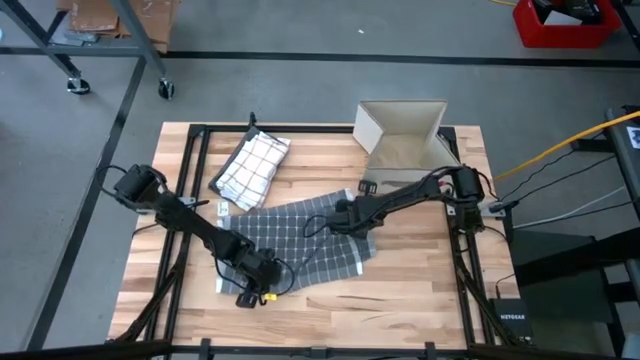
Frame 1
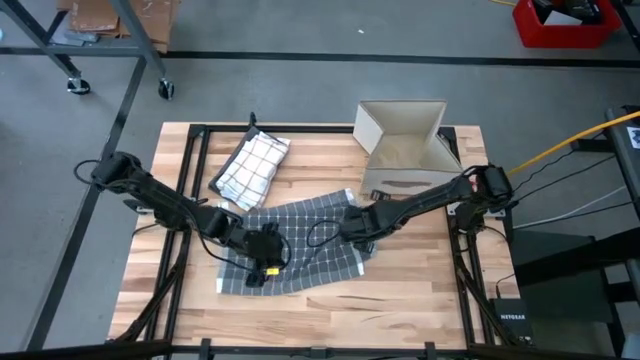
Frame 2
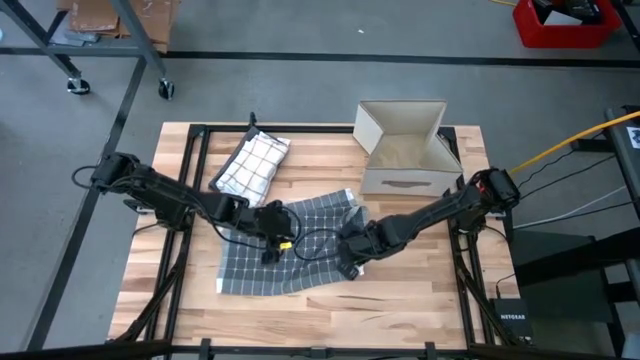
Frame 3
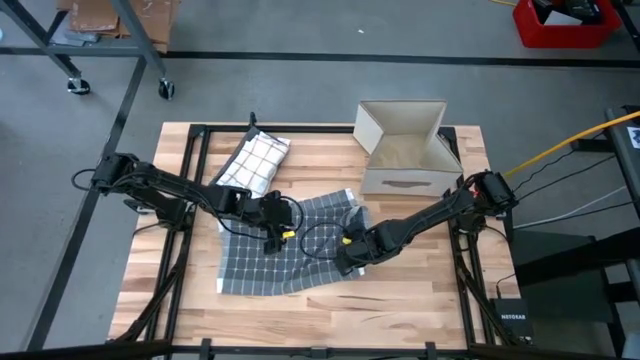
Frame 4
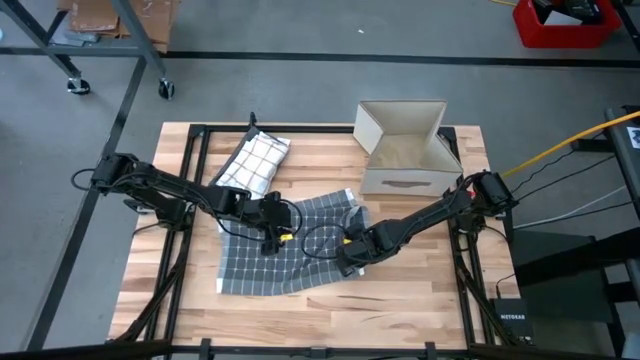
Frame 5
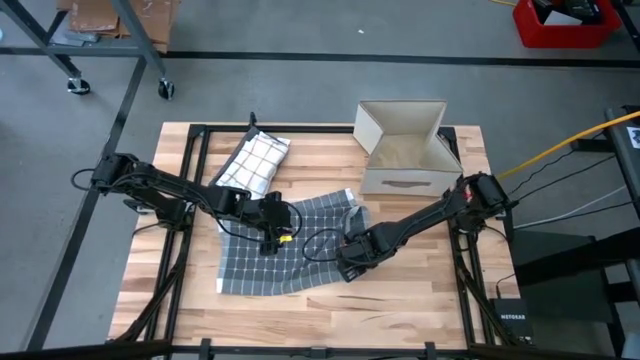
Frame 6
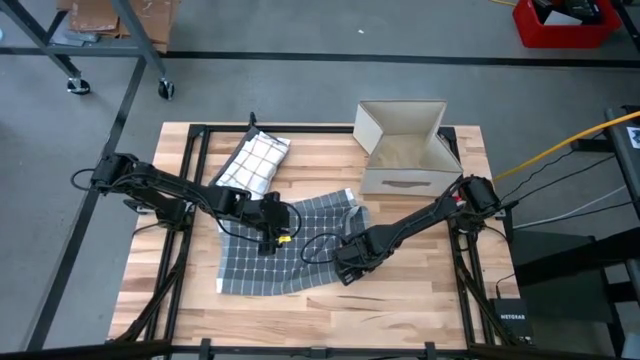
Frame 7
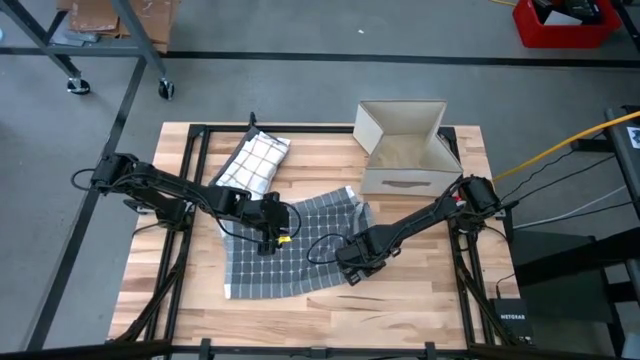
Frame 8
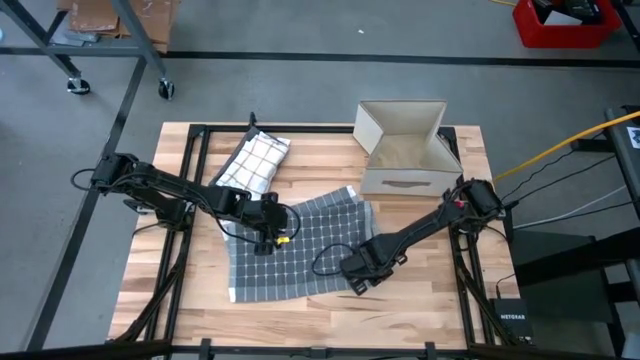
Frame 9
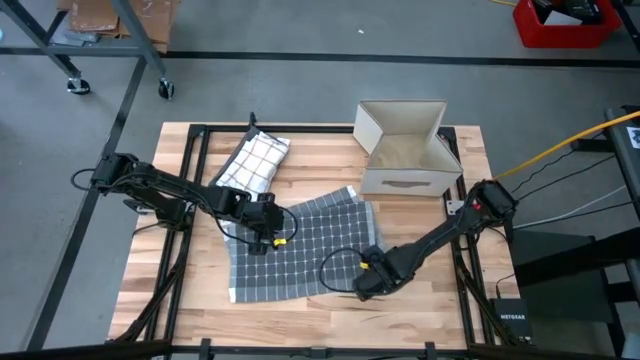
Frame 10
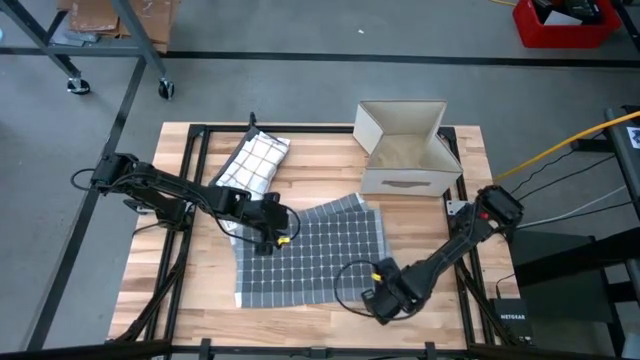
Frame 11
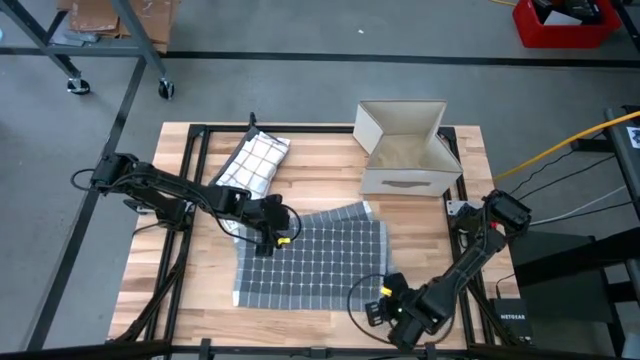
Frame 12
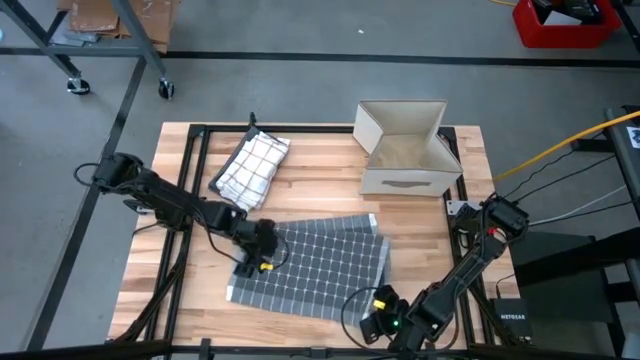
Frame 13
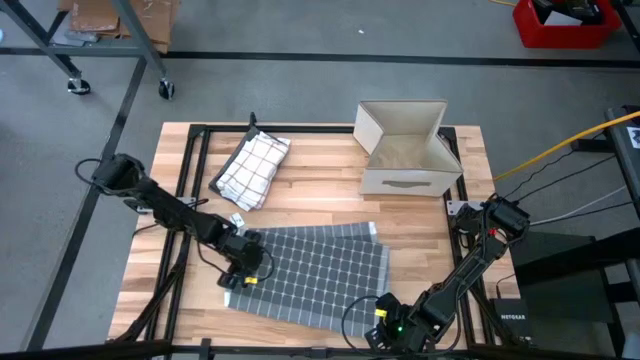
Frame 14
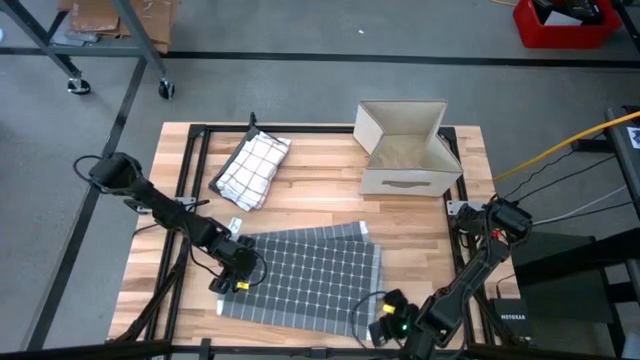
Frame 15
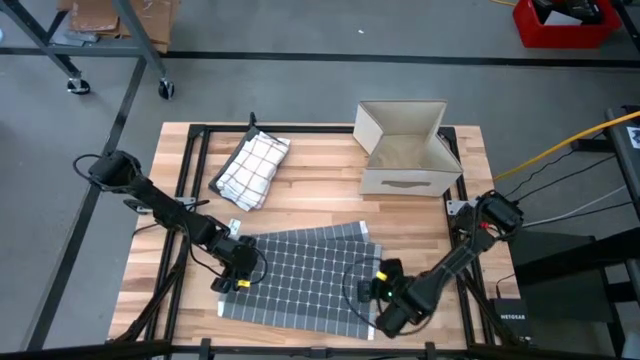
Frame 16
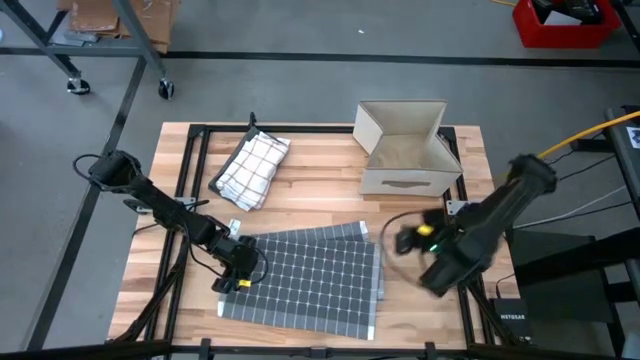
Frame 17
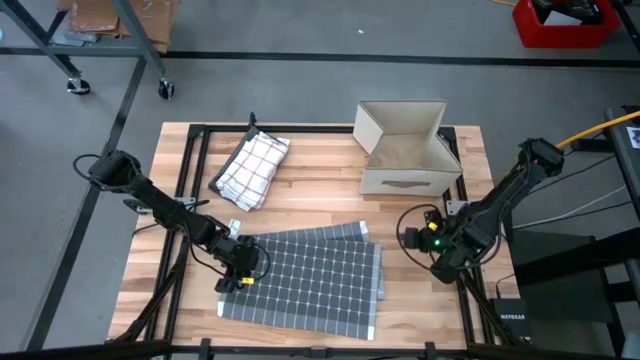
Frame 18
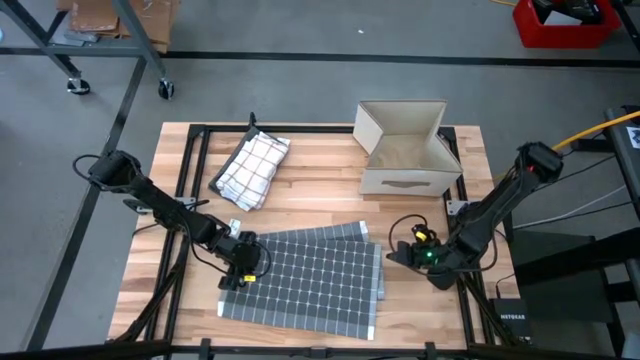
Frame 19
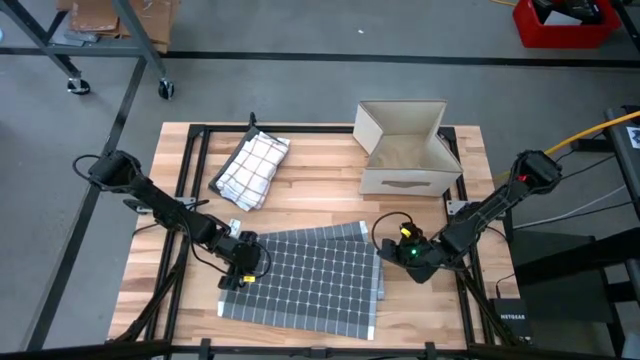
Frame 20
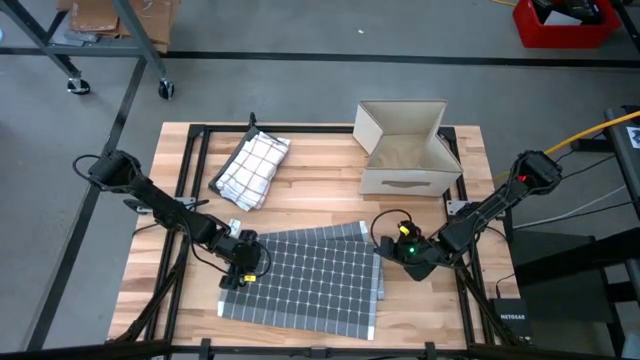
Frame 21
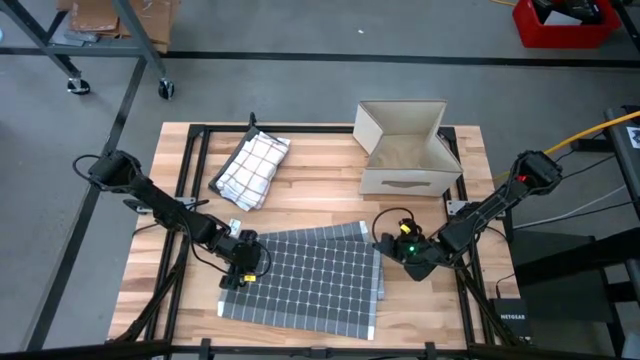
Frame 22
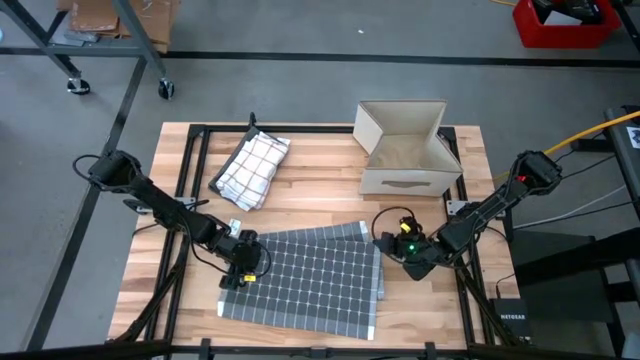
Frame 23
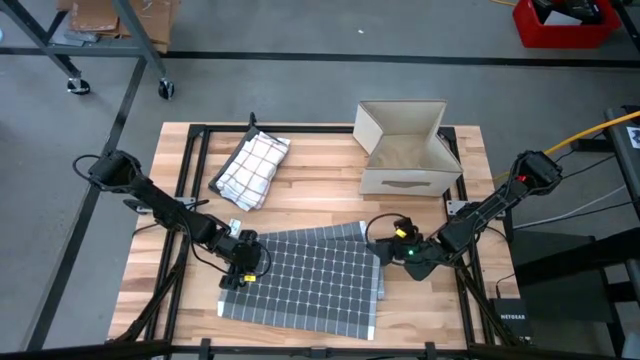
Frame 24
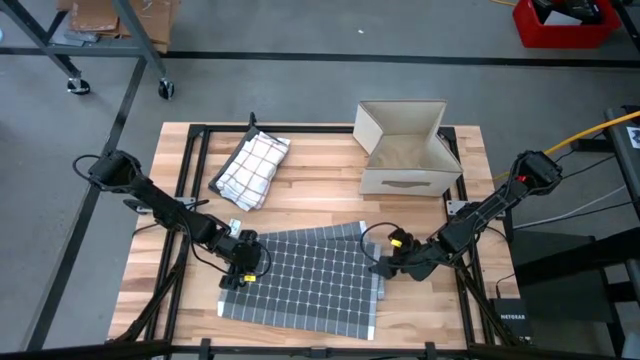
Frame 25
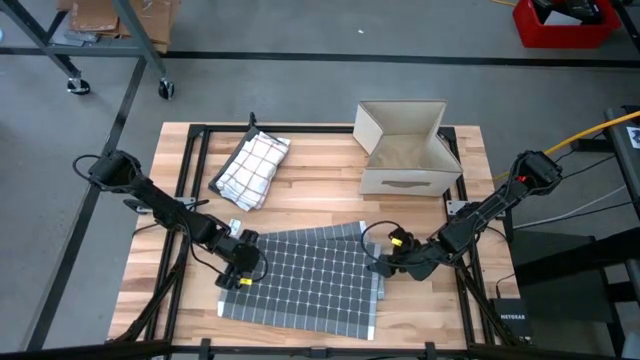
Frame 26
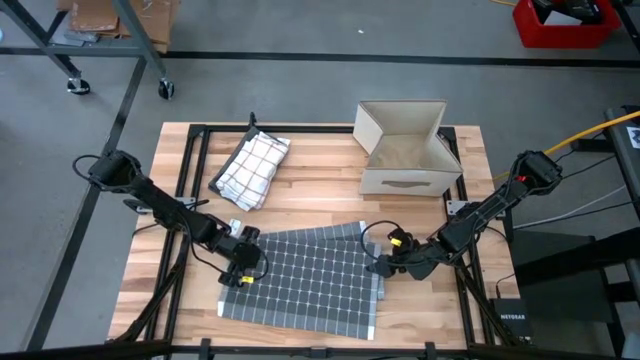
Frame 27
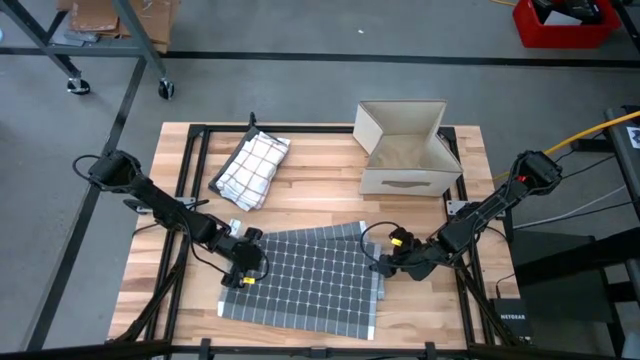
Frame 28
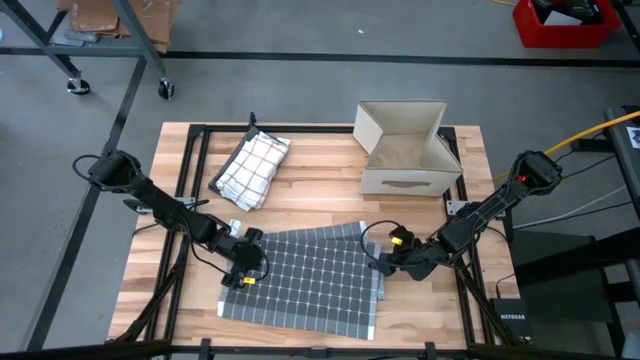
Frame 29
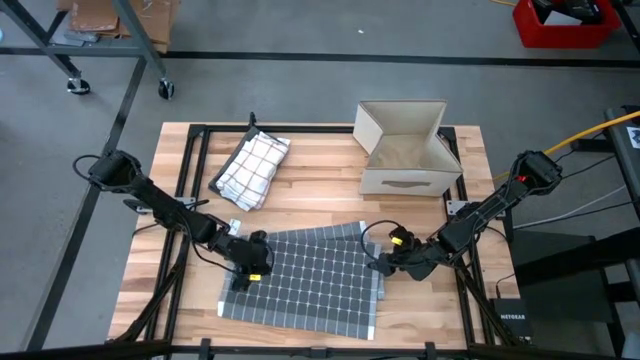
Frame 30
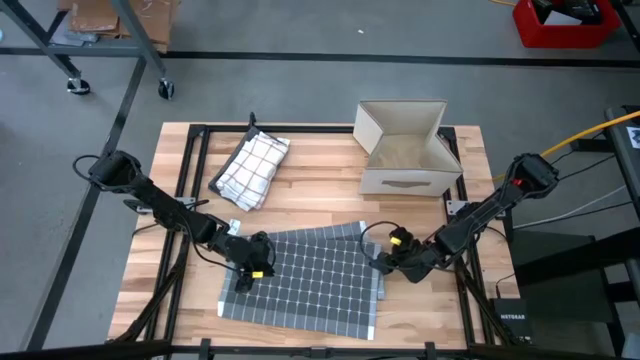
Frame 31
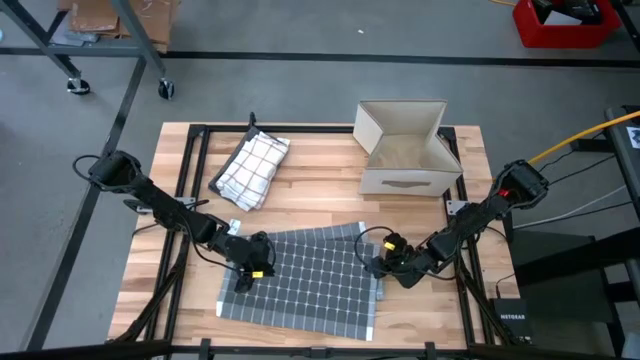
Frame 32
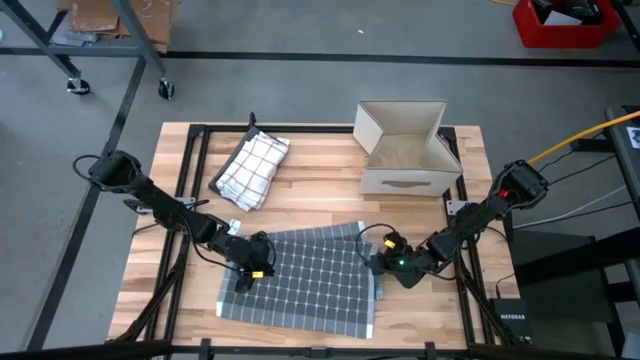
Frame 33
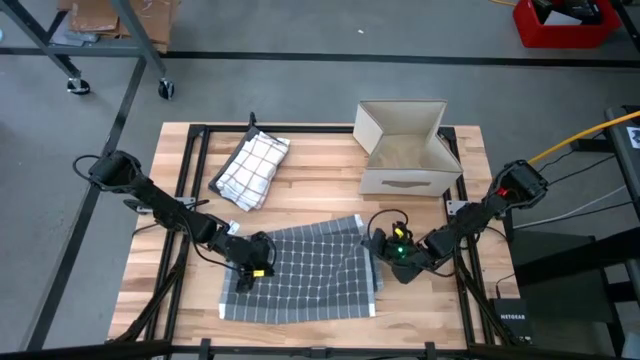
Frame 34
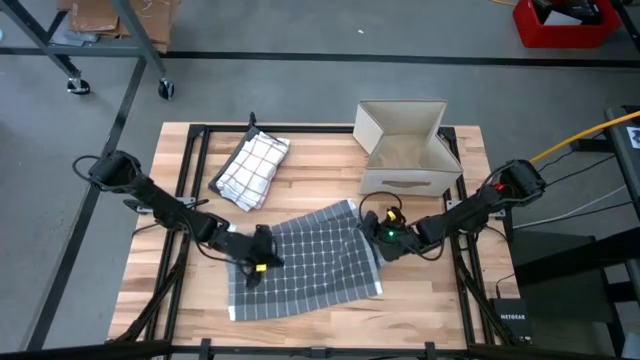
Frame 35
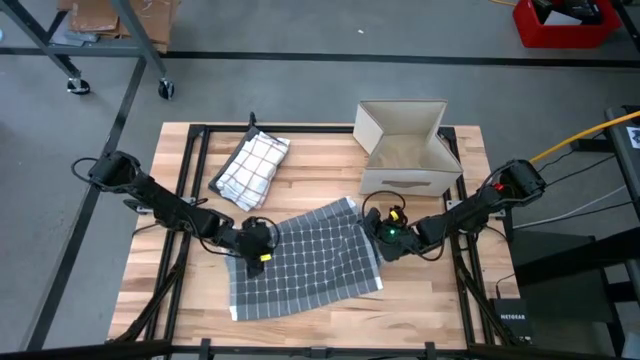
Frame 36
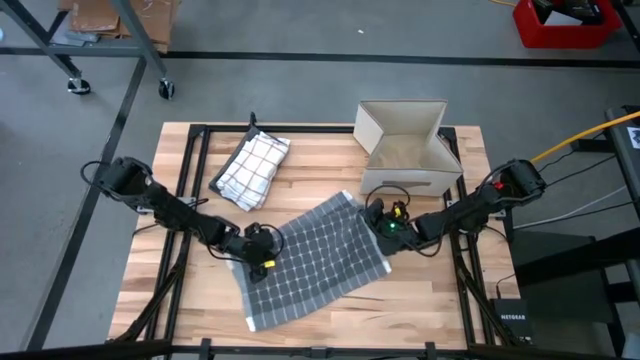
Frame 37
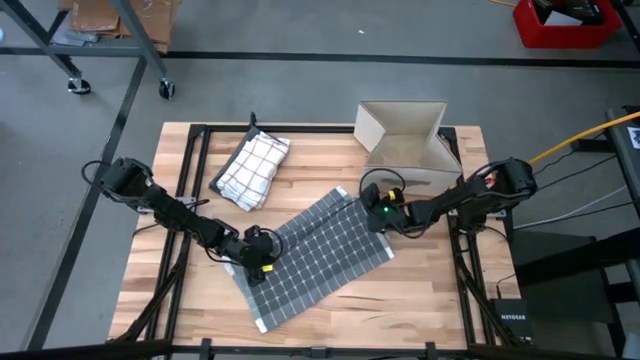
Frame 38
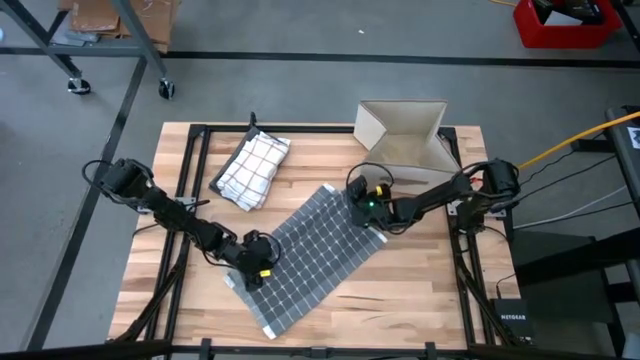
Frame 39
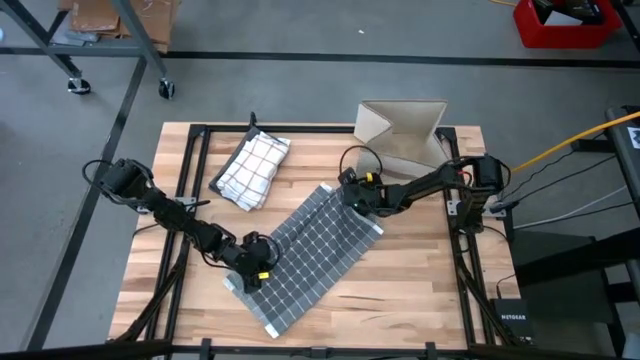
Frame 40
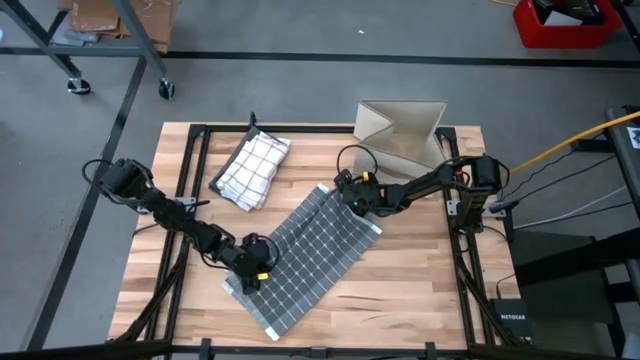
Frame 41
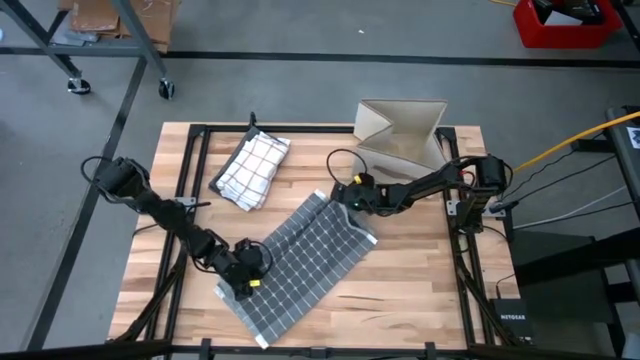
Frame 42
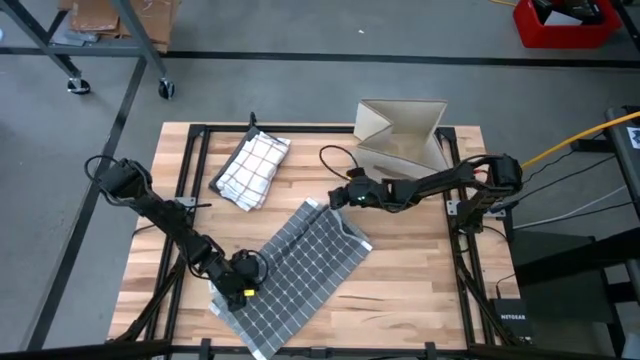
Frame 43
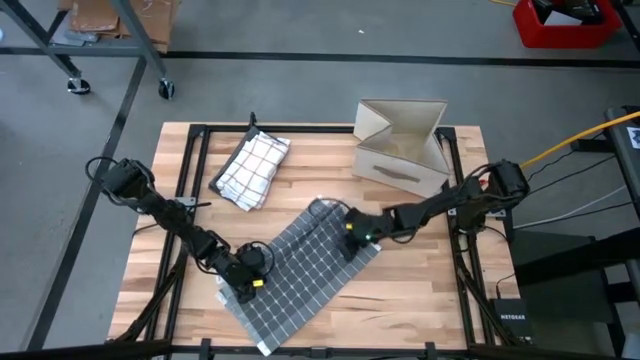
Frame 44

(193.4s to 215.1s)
Task: Fold towel
Fold the gray white kitchen towel
